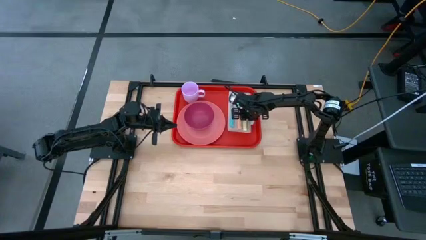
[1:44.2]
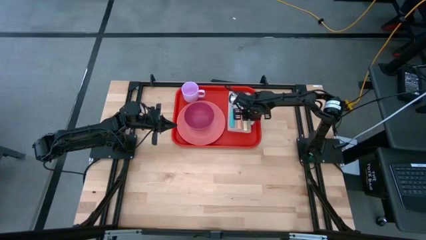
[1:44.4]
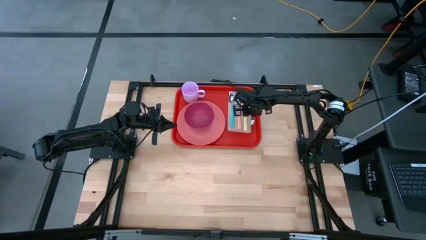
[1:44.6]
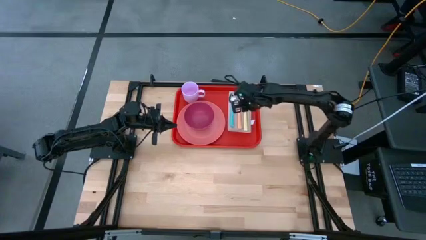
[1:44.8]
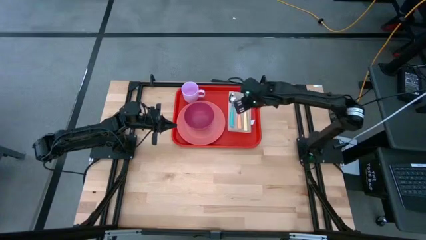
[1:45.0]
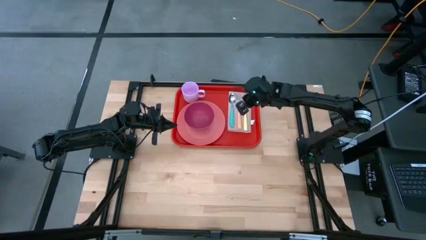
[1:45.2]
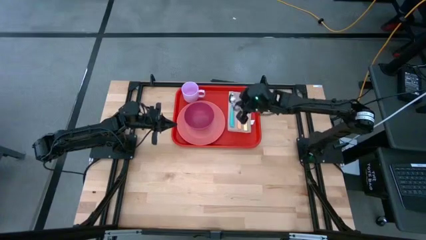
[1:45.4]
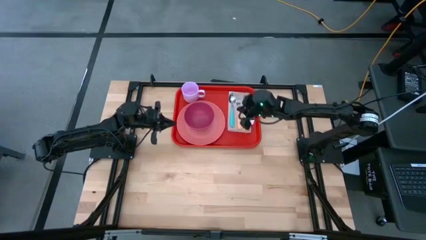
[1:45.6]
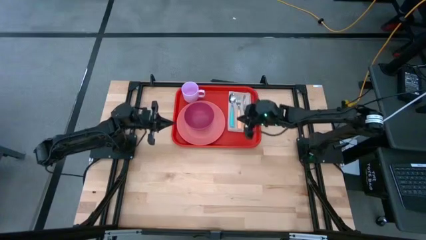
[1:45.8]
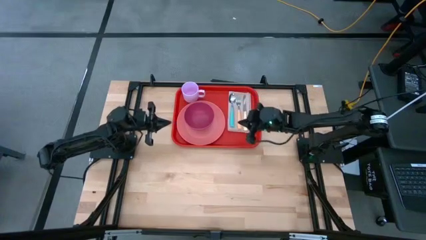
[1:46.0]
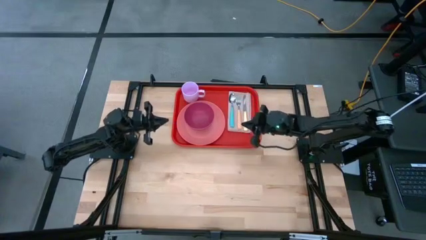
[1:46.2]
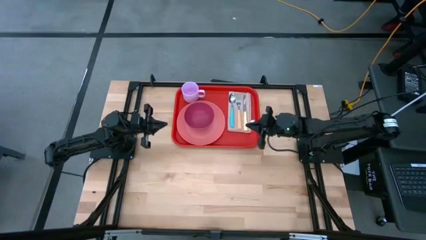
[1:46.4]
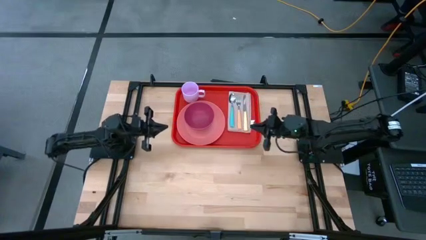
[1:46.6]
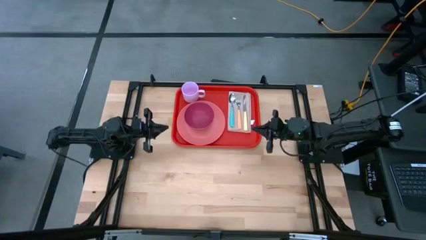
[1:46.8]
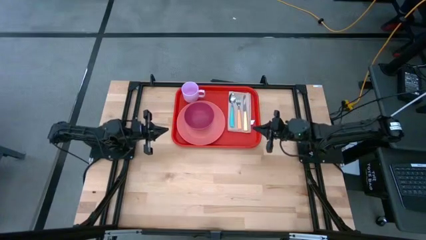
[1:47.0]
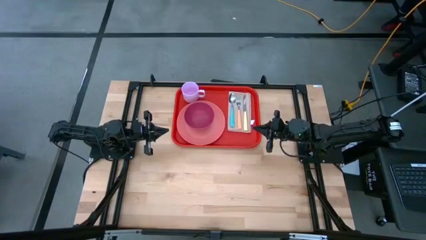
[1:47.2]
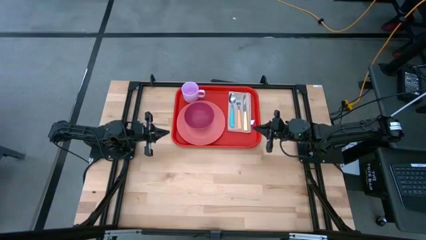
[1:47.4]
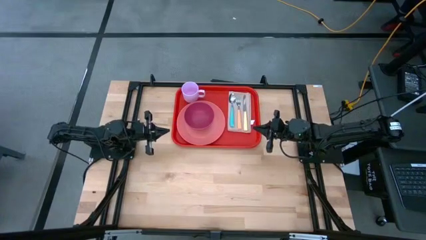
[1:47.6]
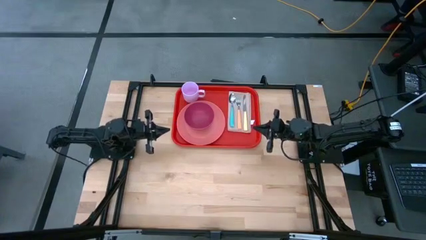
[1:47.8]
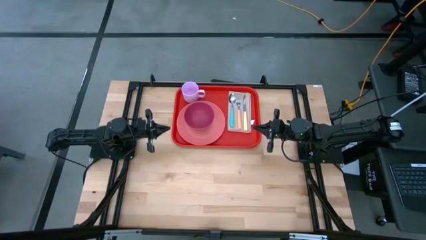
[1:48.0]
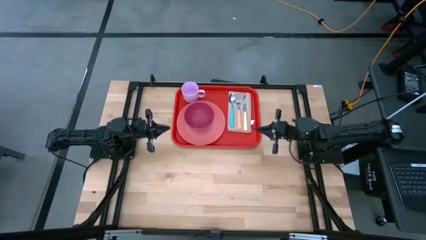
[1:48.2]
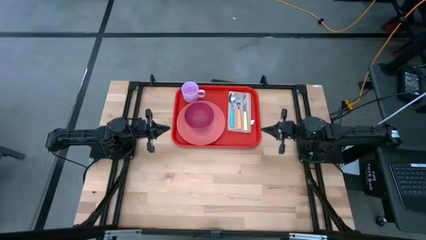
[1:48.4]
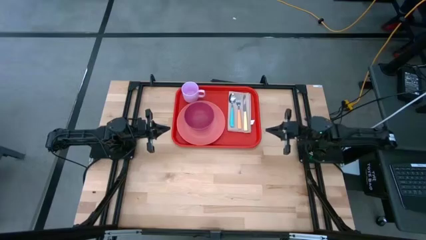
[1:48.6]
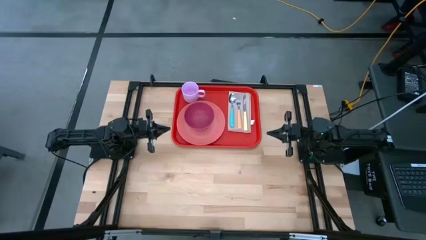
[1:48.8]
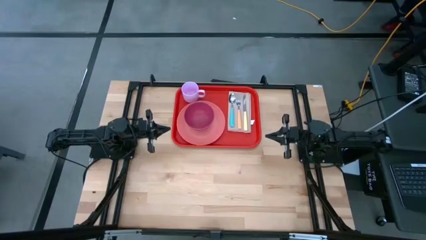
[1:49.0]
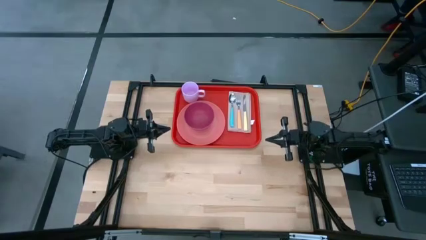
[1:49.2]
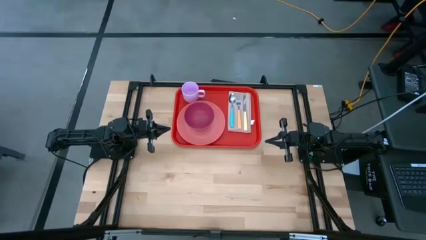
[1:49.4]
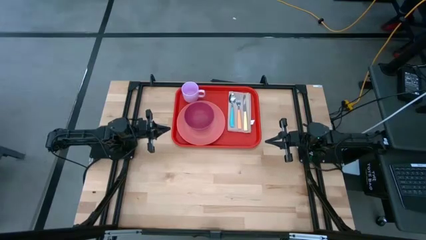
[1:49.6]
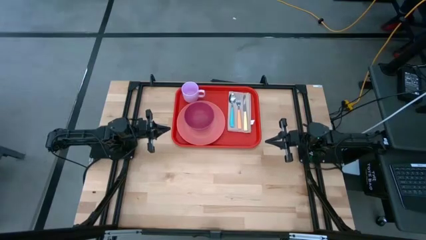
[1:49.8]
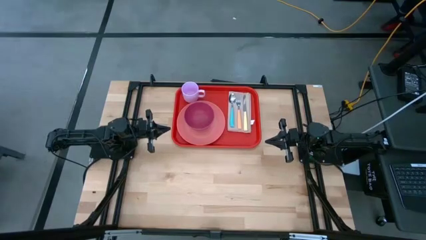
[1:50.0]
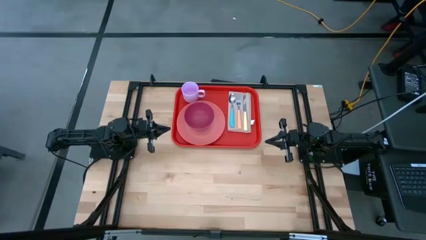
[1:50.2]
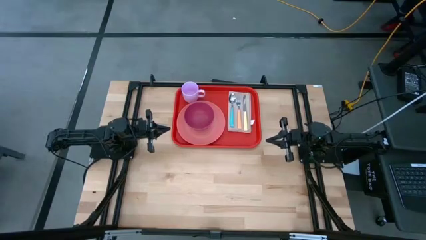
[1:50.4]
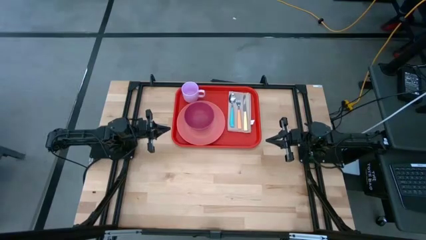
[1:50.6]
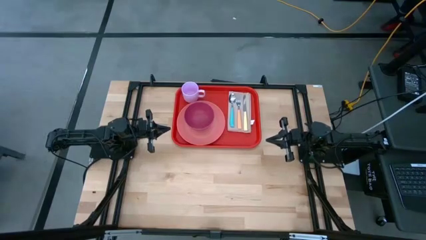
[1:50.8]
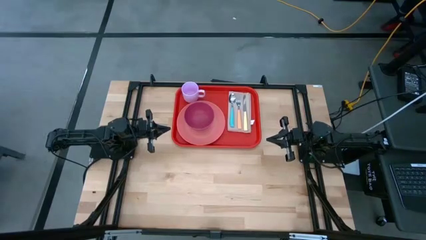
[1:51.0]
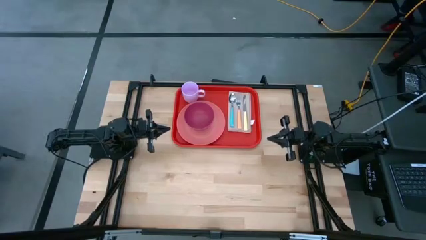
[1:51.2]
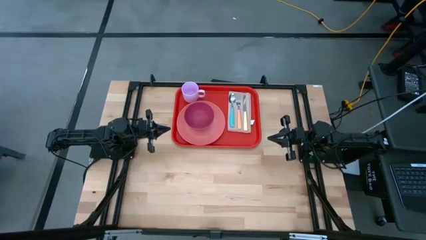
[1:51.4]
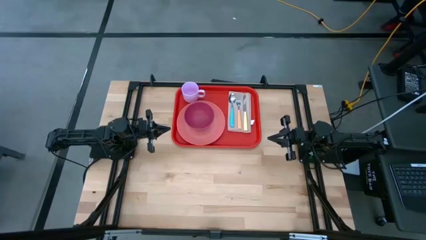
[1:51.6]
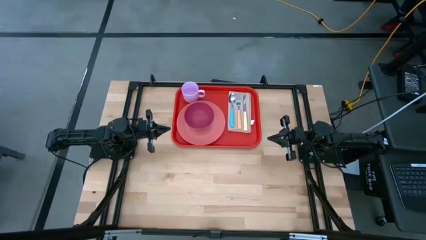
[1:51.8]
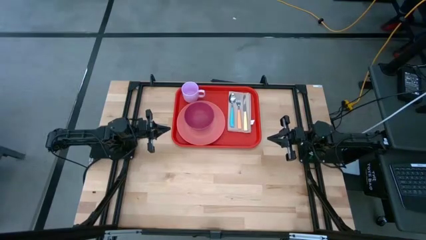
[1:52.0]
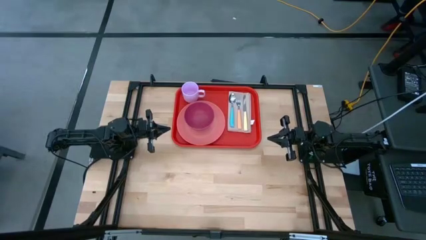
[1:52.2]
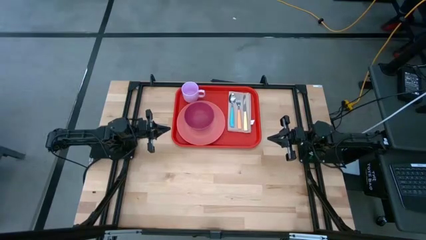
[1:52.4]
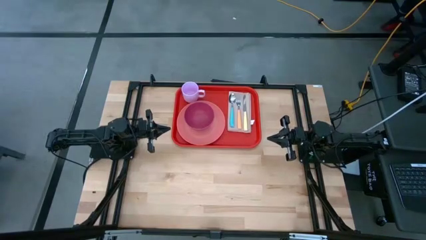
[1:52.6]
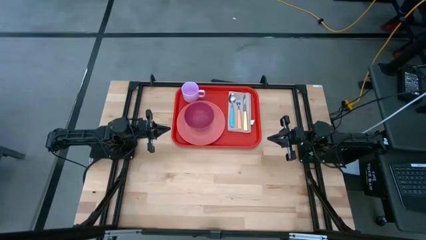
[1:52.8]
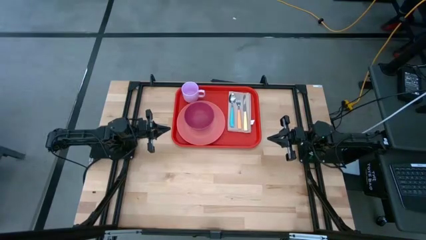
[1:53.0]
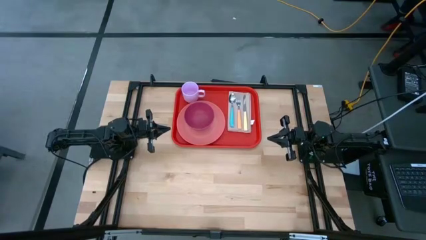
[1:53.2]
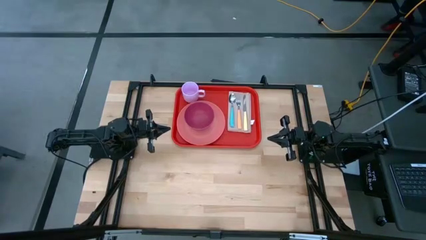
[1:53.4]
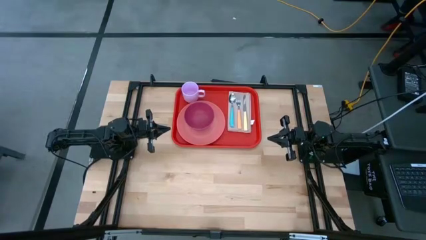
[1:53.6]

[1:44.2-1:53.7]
Task: Set up tray
Return to Home Position

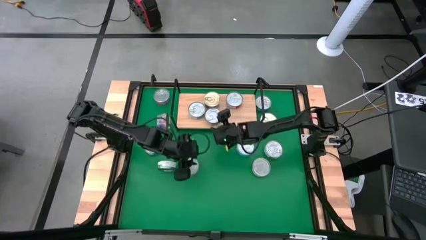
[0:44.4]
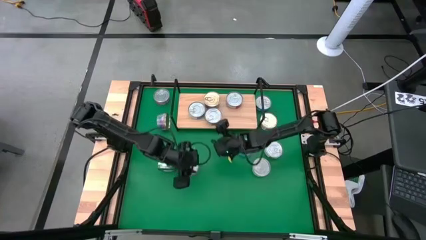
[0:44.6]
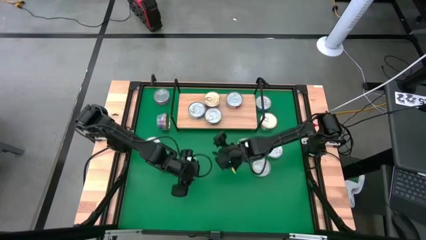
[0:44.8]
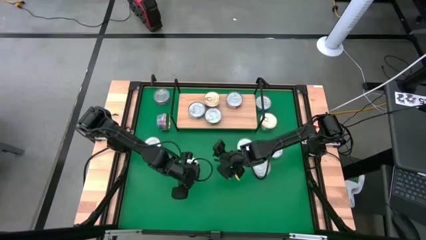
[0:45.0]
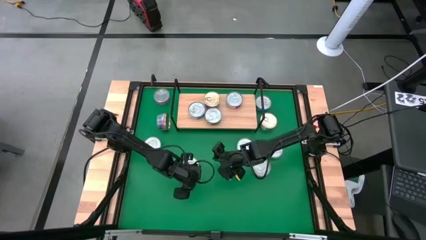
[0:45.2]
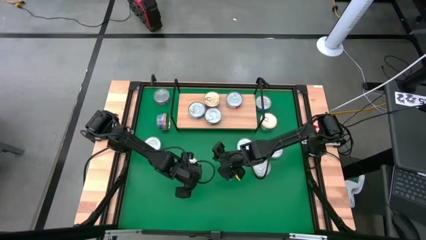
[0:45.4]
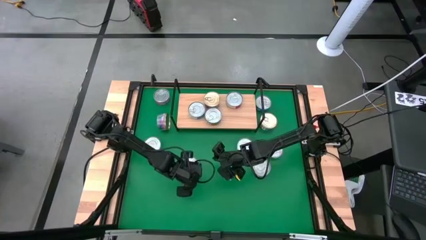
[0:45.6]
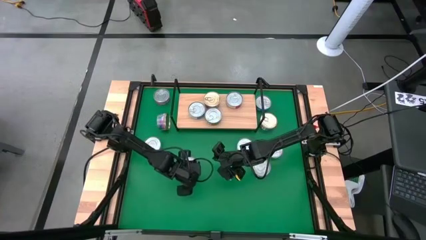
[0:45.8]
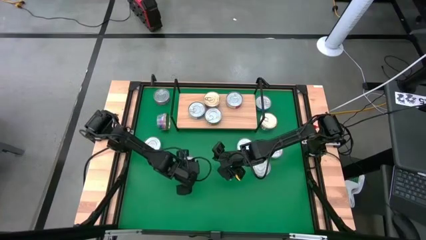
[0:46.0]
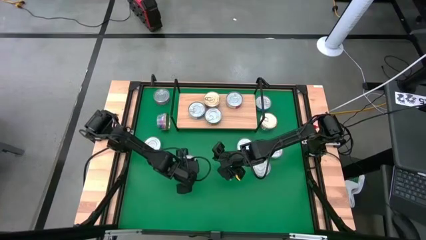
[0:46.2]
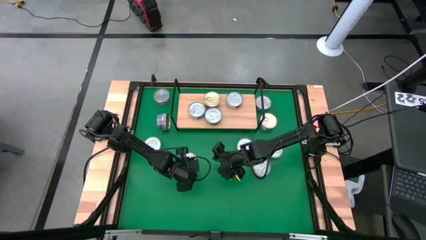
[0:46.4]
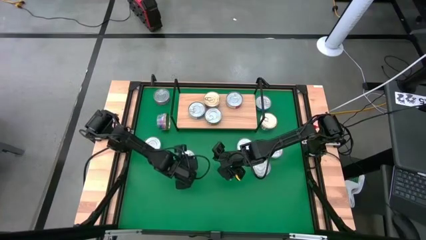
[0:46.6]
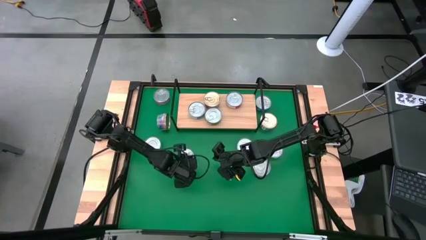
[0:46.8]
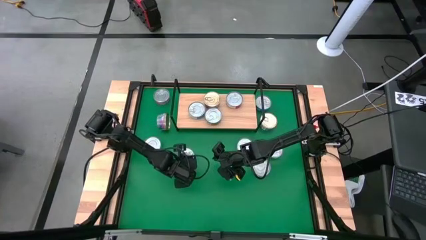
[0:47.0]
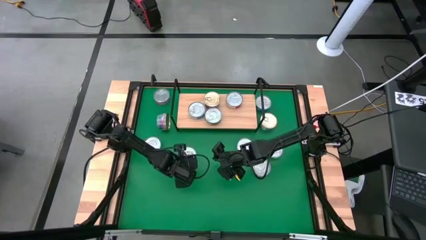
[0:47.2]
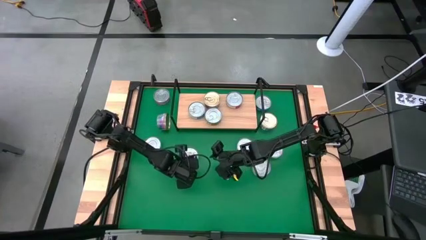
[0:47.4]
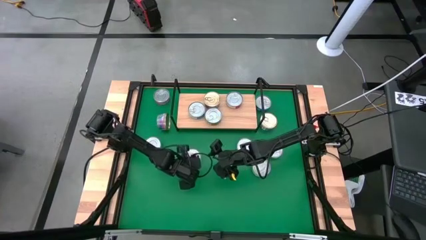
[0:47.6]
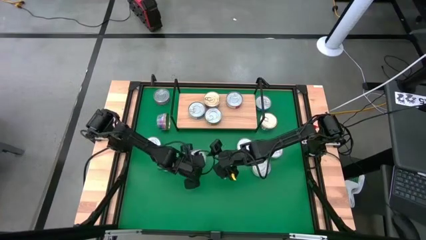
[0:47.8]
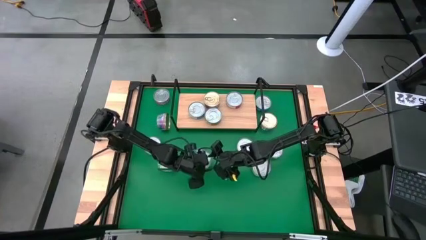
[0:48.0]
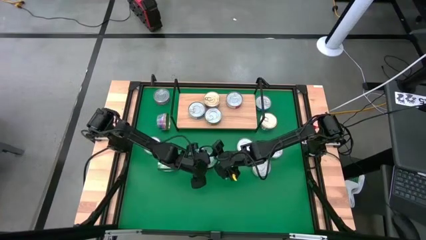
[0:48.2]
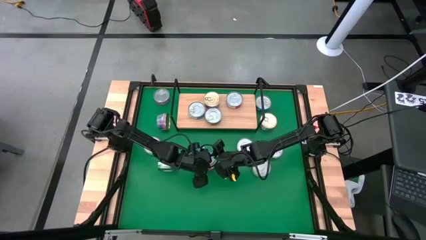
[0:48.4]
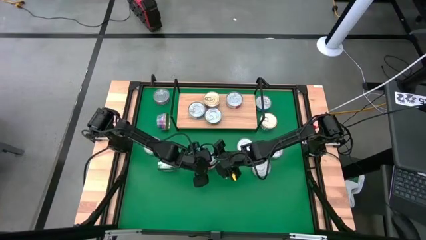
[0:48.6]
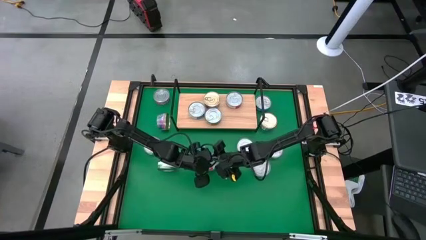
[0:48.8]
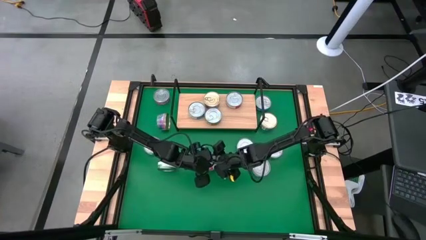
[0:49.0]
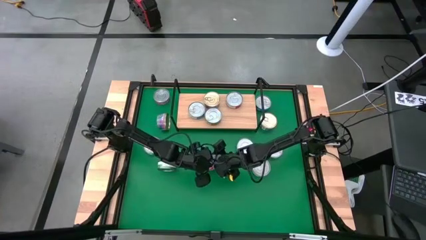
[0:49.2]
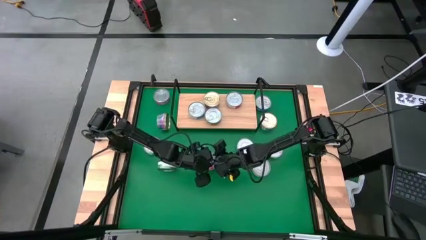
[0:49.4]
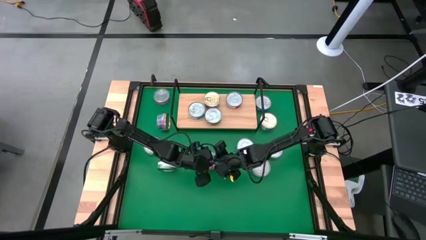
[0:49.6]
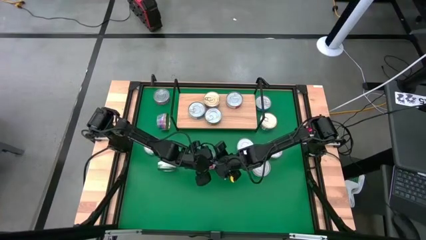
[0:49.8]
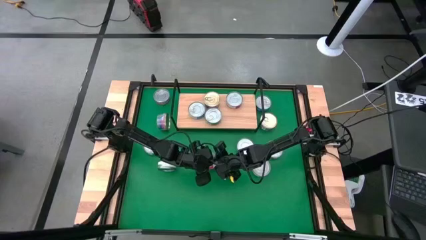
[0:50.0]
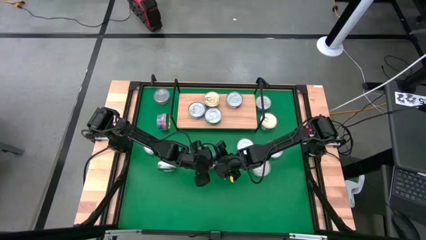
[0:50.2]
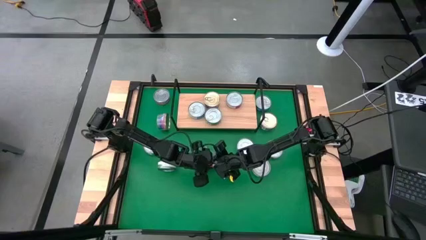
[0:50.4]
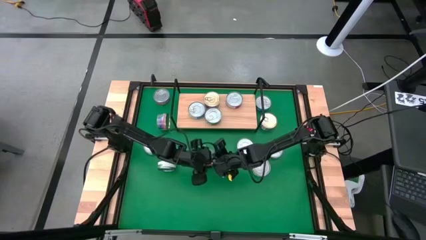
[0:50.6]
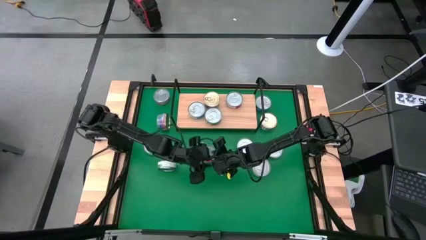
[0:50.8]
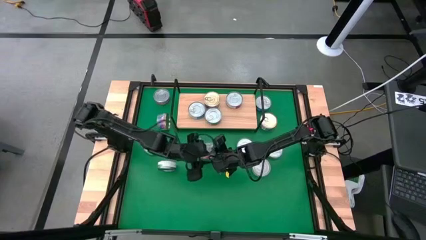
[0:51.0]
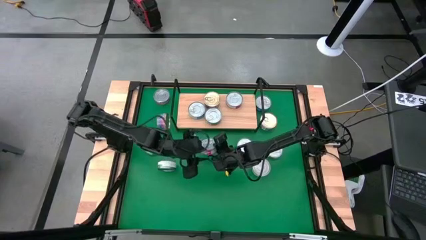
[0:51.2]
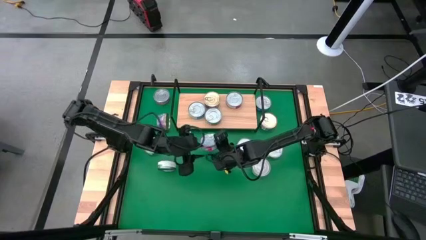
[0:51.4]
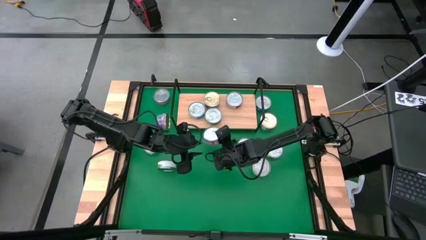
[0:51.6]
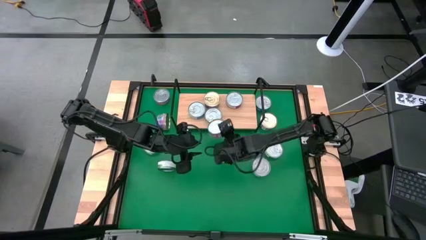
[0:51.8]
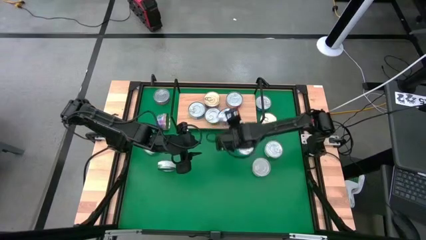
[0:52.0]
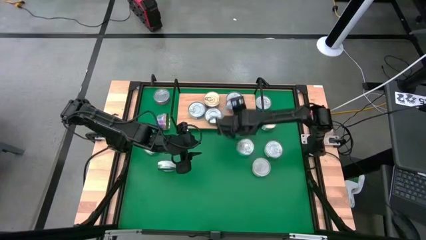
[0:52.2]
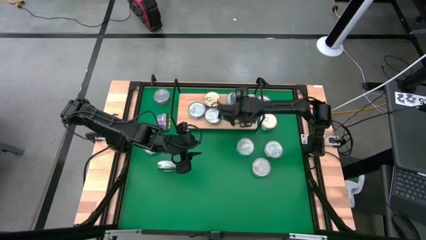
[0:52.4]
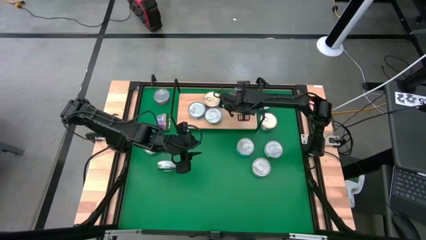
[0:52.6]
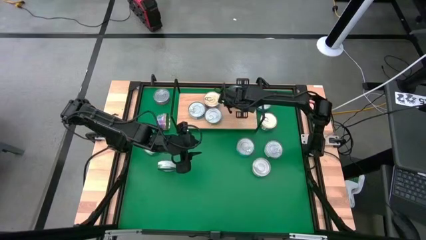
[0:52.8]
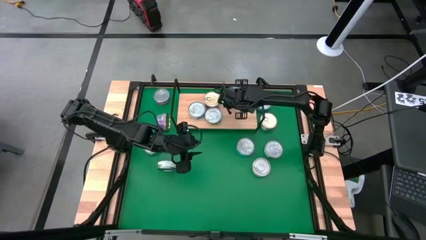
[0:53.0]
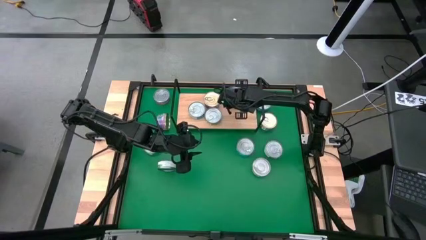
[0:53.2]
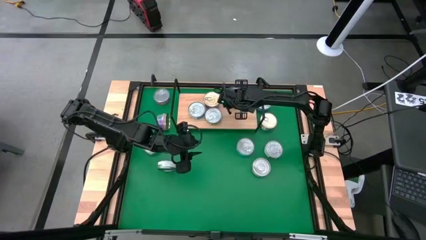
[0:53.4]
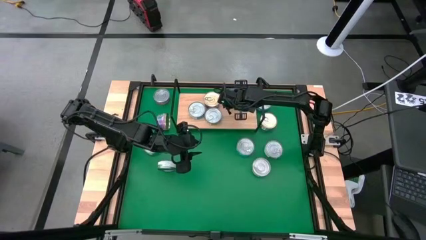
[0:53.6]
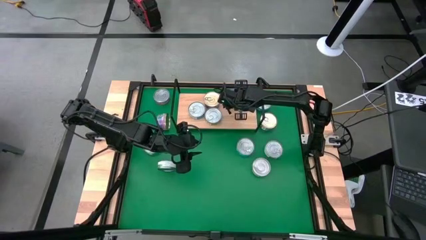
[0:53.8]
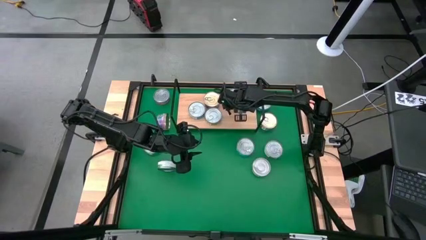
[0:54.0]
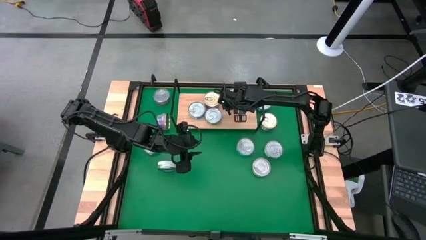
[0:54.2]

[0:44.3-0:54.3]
Task: Stack canned seafood by type on shelf
Stack the red tuna can on top of the red tuna can on the shelf
